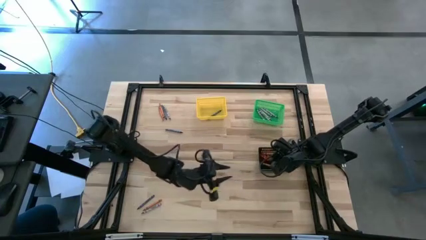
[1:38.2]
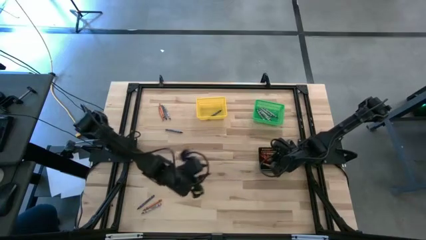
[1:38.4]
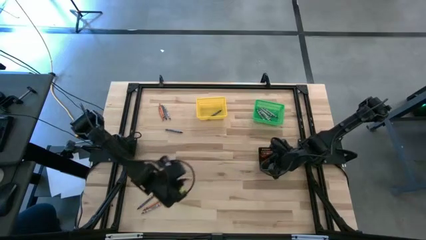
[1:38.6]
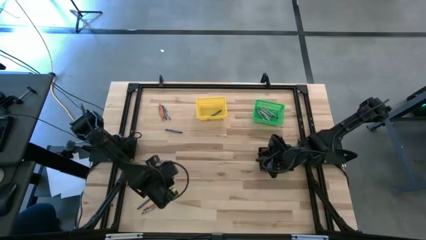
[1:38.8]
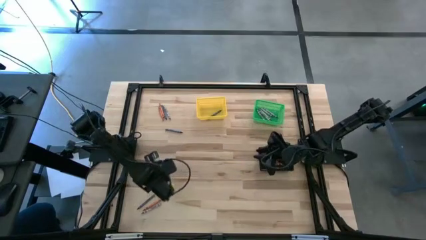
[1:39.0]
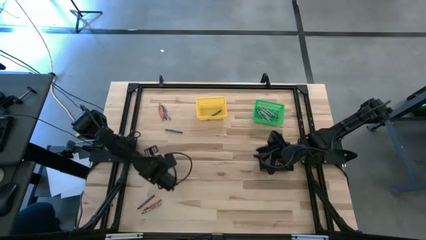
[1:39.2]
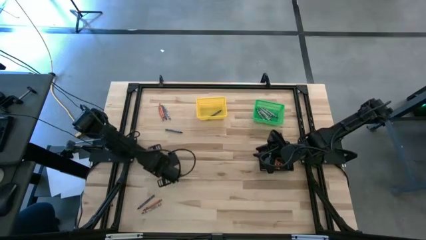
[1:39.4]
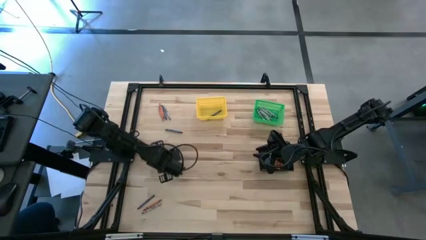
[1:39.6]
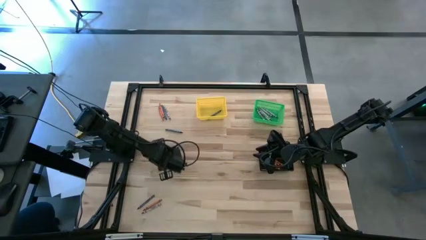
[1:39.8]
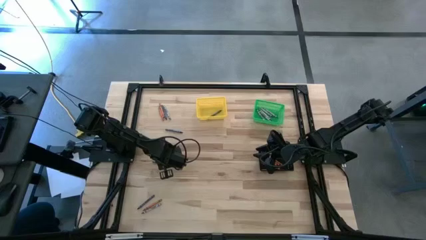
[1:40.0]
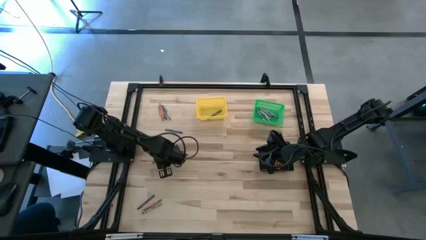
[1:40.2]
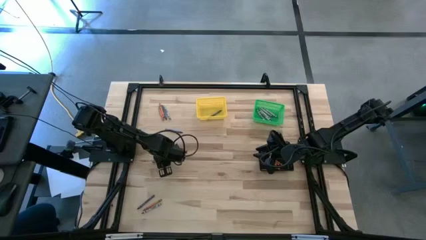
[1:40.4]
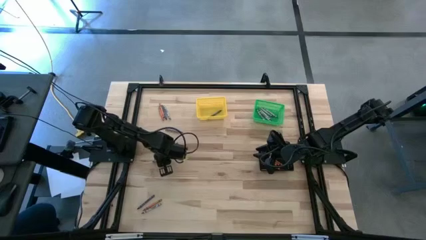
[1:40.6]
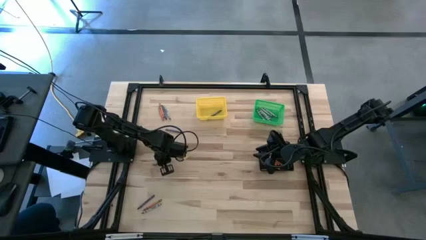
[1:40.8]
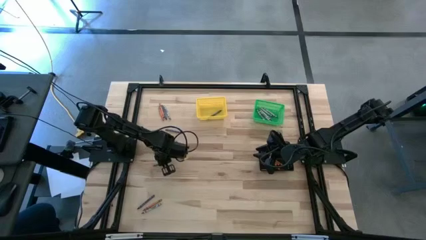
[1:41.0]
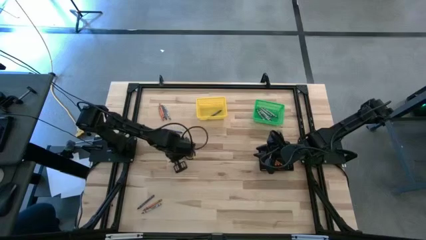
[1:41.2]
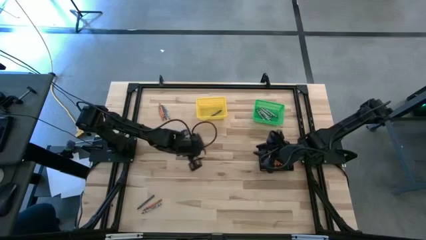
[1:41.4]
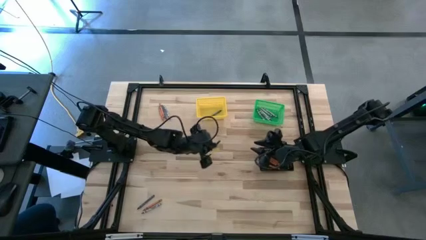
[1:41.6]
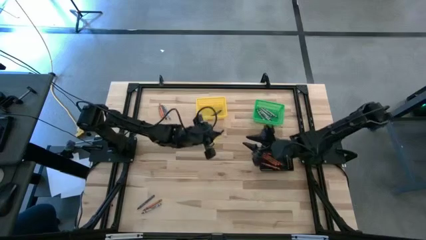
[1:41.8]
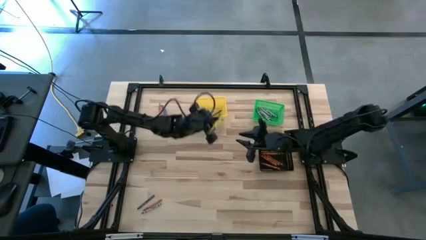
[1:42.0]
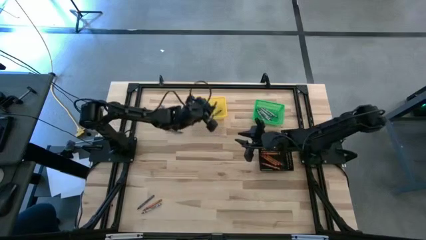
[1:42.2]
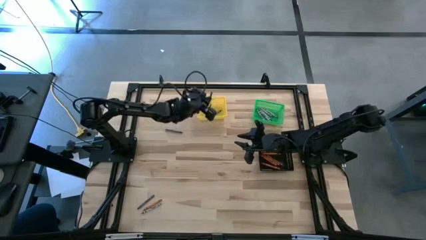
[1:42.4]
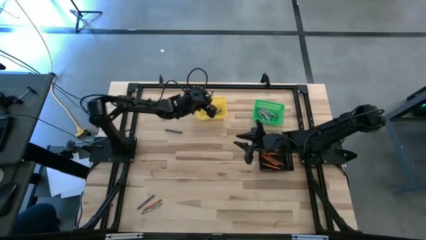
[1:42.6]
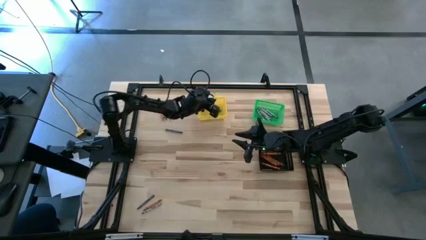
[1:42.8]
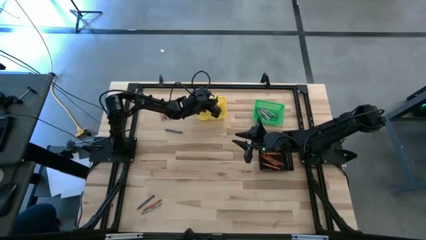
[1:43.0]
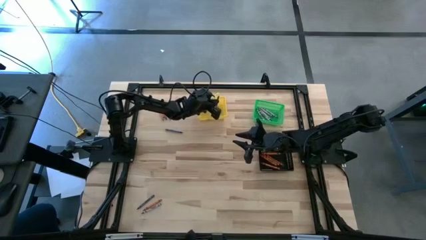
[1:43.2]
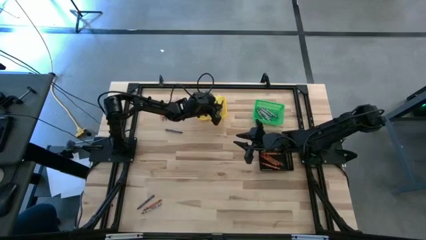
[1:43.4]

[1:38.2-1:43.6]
Task: Sort crayons
Put the blue crayon into the yellow basket

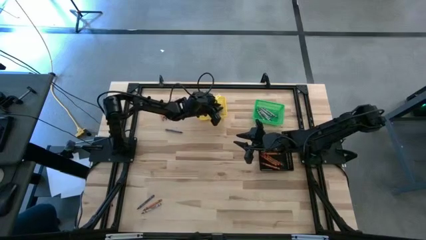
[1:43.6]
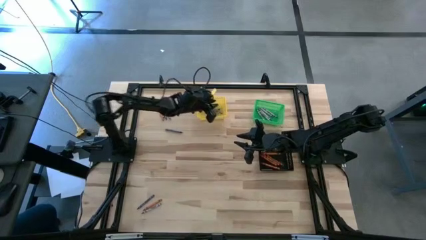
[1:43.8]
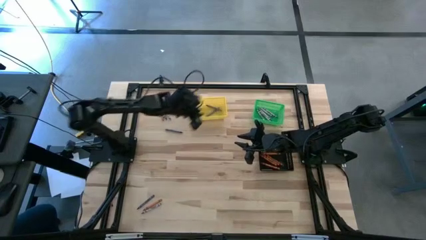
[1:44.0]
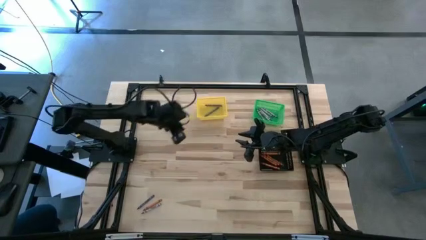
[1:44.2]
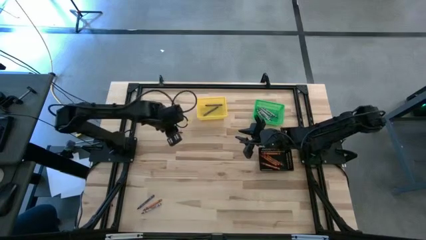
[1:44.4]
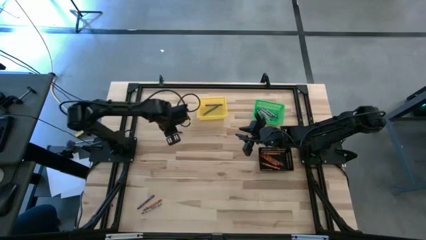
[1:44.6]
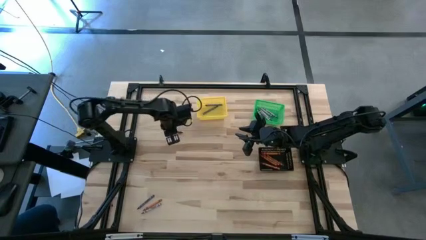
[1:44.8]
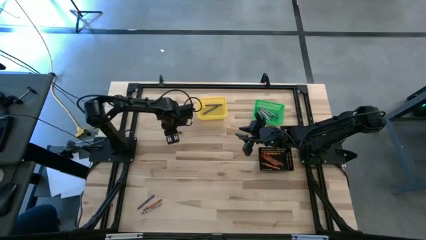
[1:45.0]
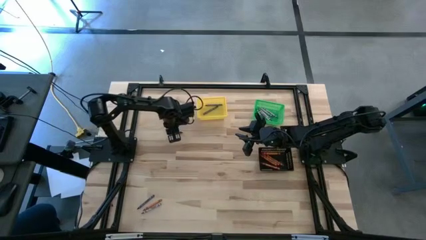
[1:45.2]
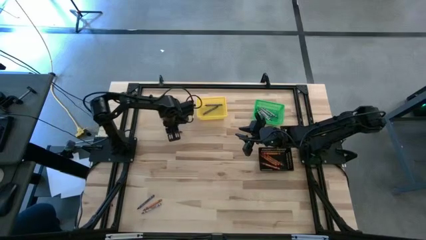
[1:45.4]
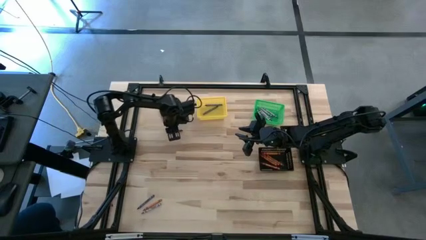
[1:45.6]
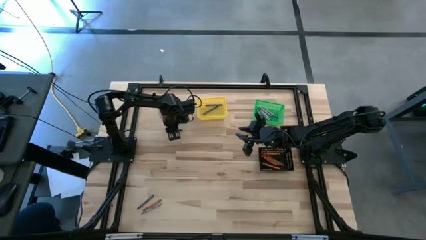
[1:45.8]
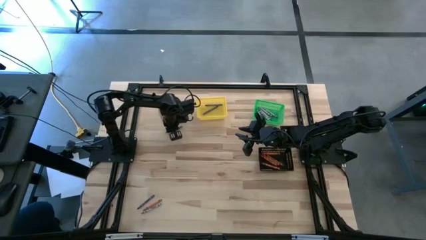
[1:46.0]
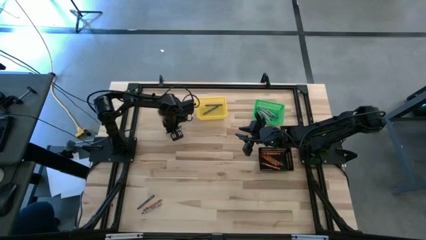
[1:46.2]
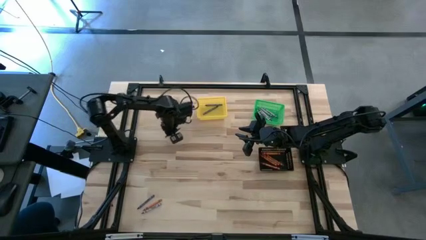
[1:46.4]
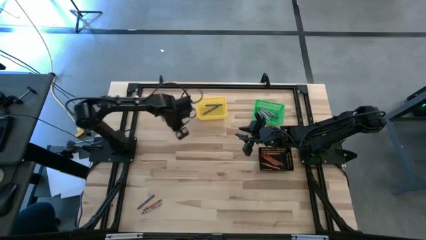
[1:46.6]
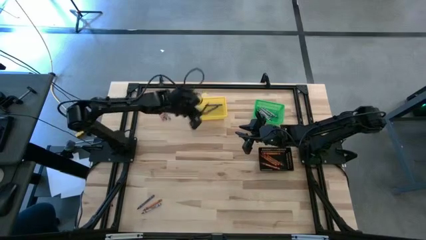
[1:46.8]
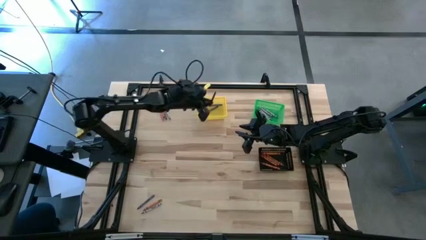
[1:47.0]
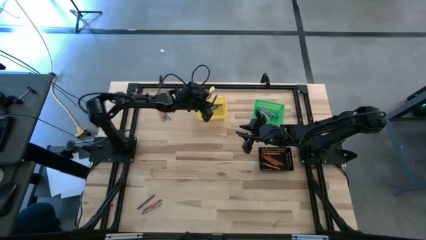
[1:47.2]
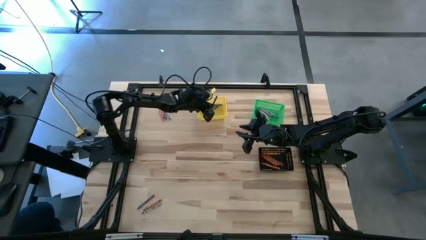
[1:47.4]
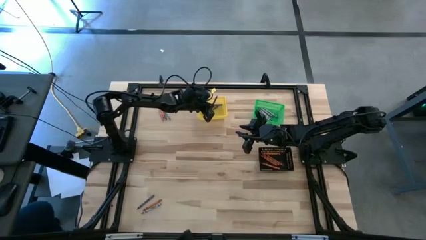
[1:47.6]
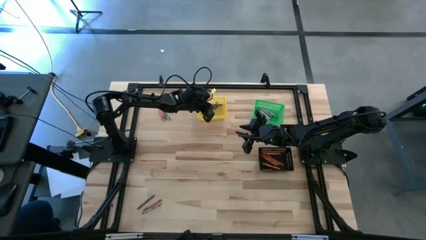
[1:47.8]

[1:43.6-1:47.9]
Put the blue crayon into the yellow basket

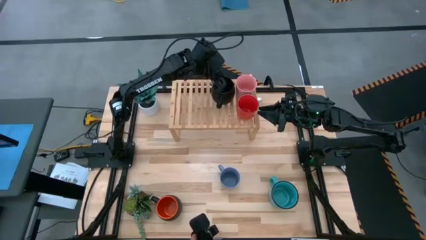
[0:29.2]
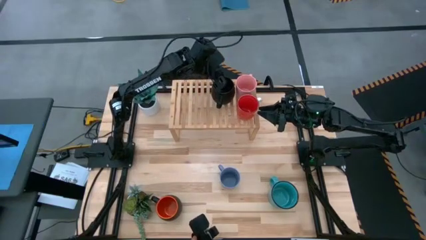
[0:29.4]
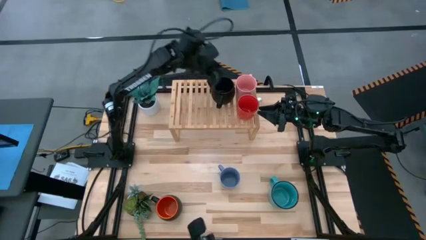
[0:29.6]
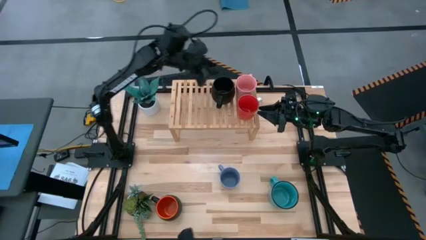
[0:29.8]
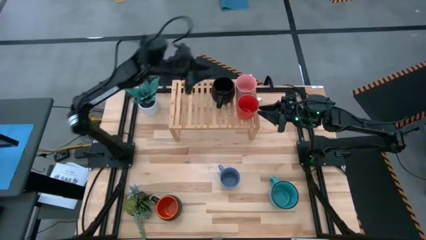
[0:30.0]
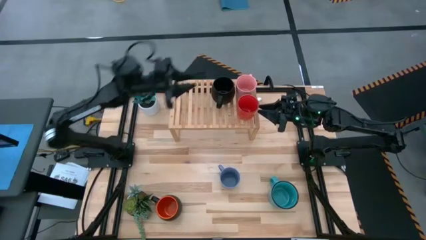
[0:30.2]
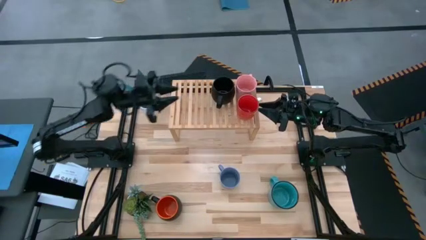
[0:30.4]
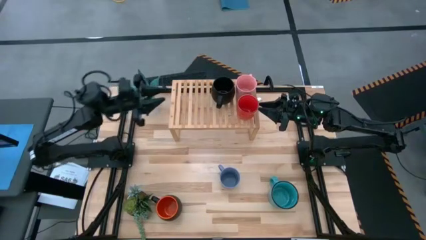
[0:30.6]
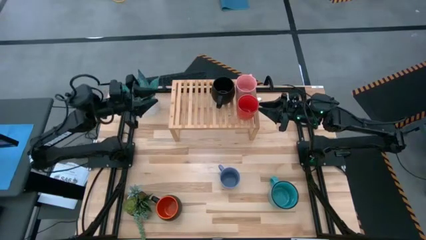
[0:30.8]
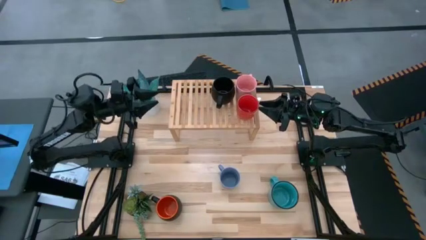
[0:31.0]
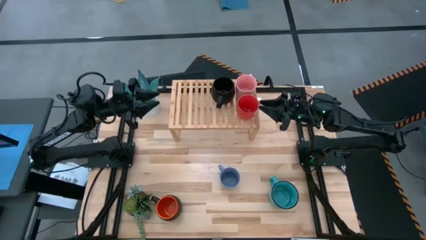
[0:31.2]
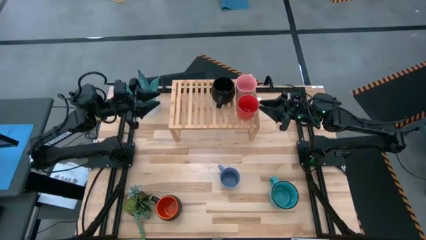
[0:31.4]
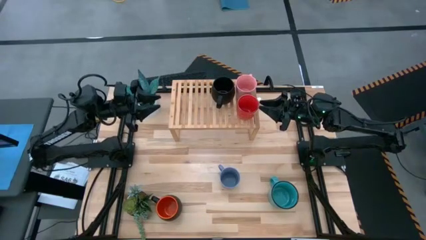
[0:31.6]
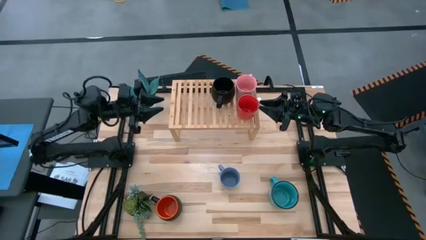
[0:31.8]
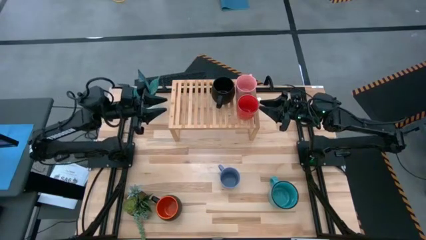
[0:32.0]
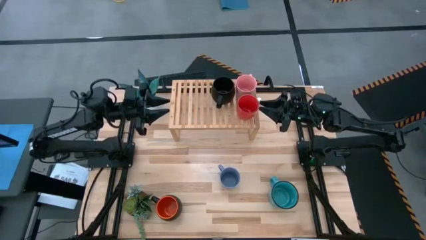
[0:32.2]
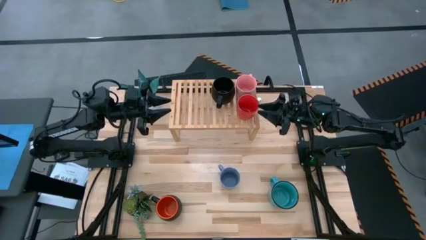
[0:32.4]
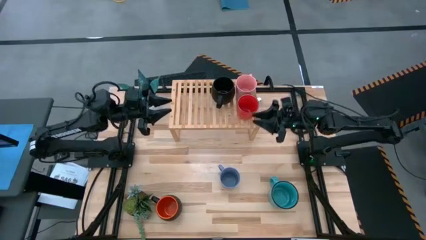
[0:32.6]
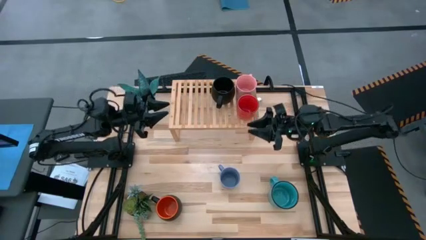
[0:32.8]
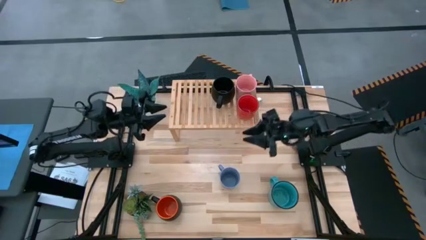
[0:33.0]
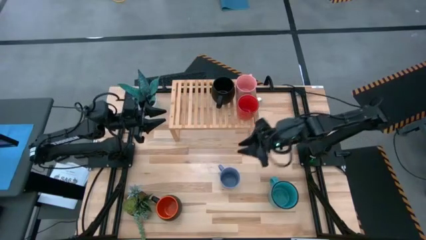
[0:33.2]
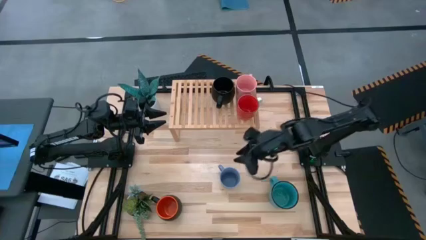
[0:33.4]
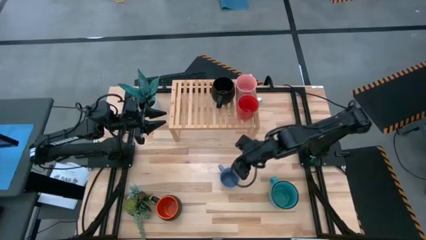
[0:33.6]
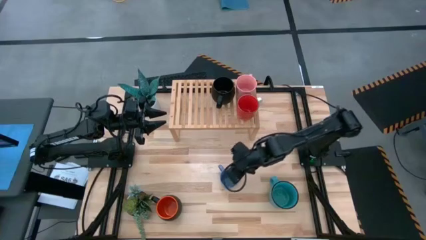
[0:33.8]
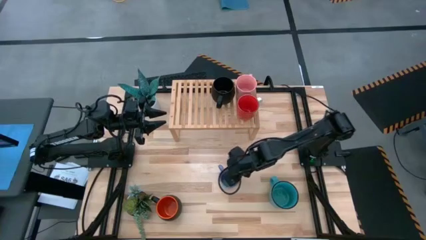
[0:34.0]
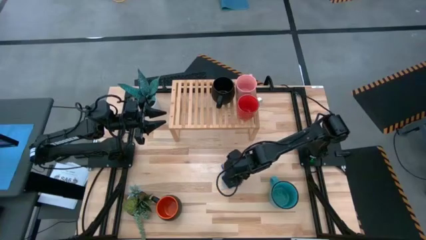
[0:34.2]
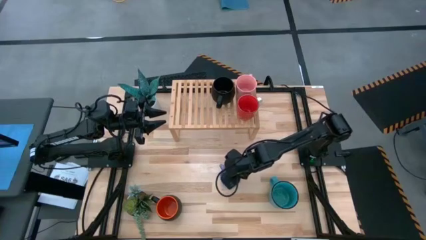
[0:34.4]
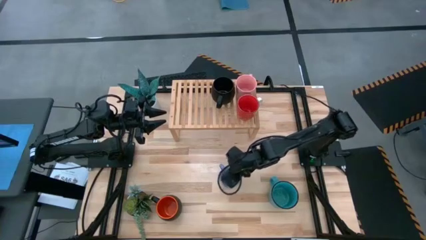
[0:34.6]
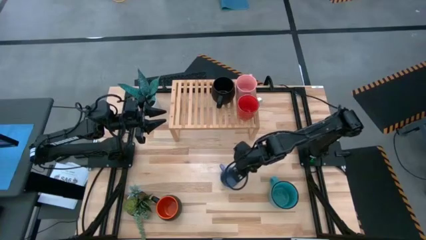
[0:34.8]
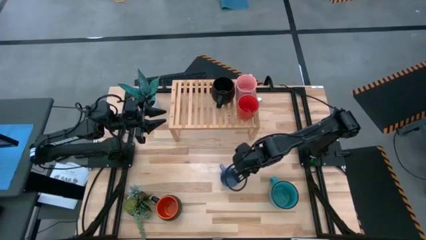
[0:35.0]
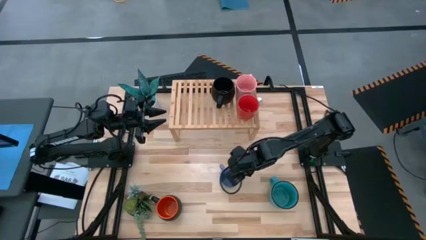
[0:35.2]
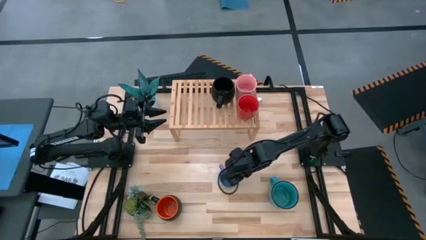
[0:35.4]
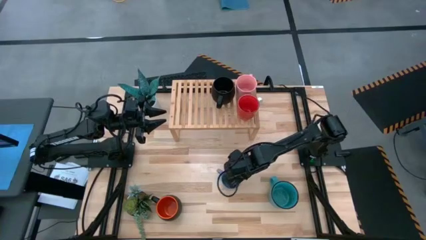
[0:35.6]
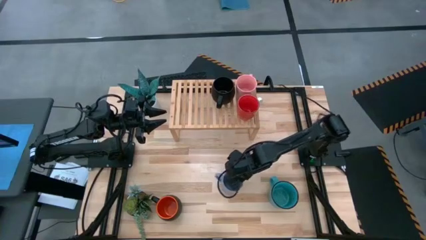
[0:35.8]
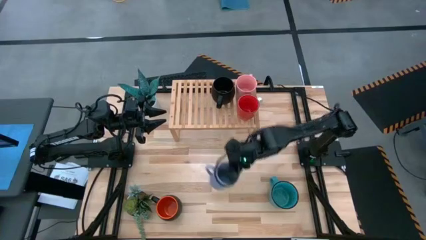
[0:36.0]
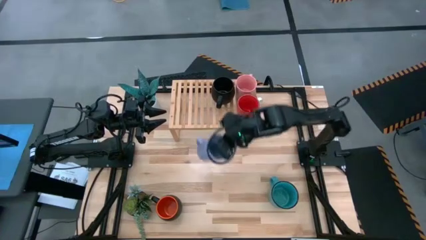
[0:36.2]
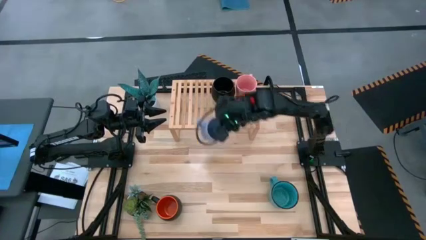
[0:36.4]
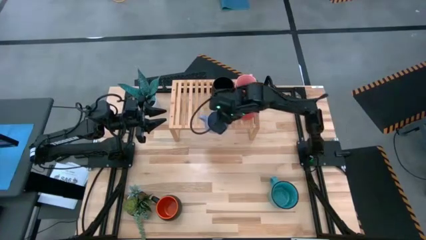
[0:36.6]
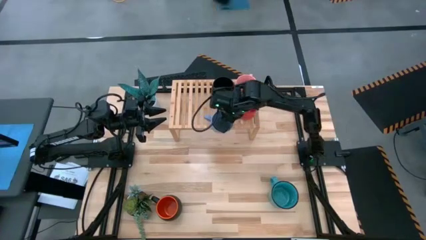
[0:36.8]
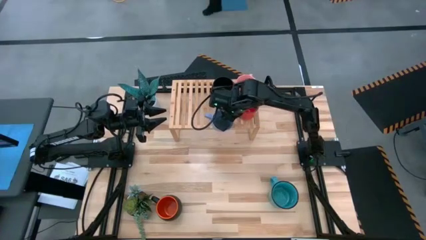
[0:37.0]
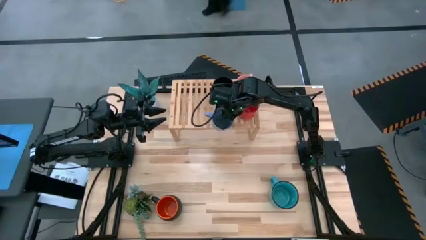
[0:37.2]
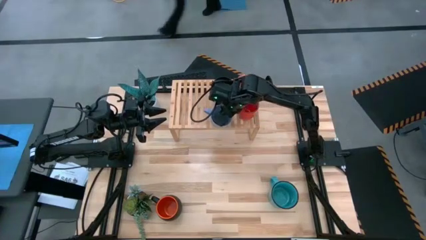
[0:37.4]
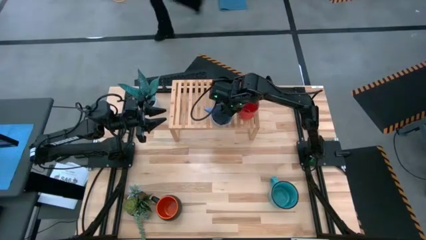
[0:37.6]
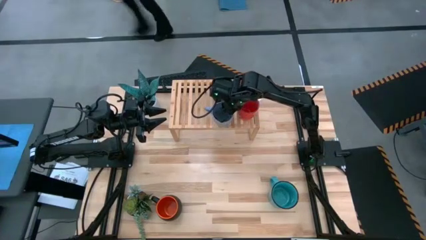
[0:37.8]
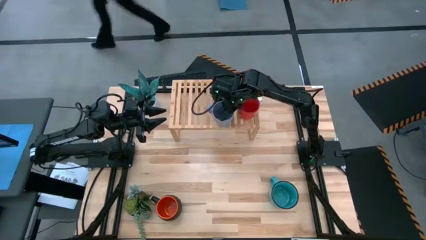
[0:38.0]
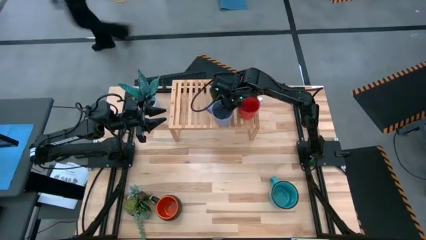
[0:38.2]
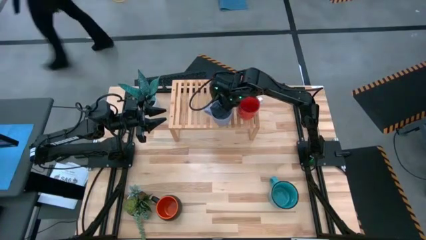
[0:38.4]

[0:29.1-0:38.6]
Task: Place coffee mugs
Put the blue mug on the shelf
